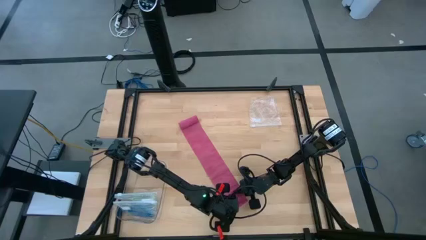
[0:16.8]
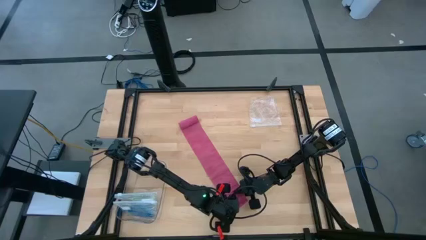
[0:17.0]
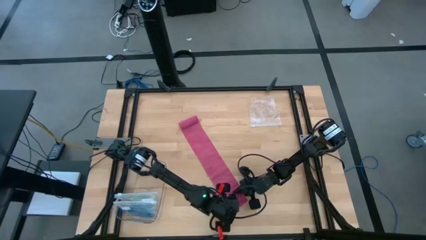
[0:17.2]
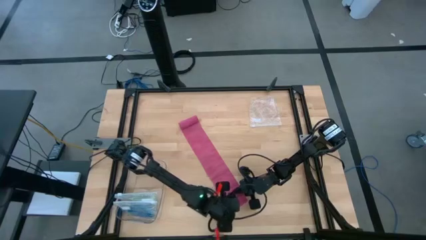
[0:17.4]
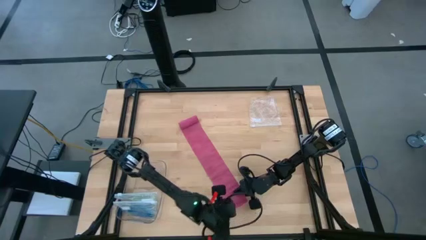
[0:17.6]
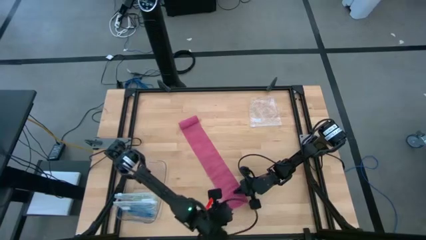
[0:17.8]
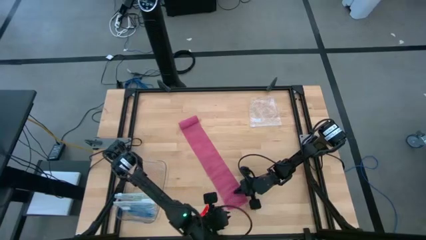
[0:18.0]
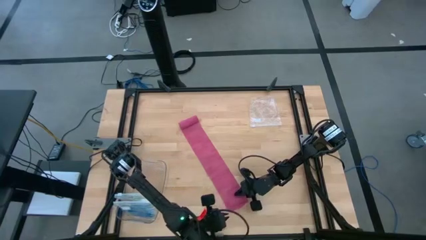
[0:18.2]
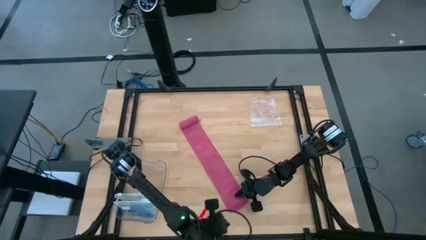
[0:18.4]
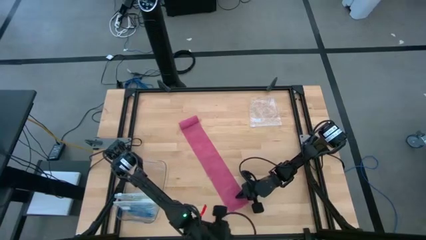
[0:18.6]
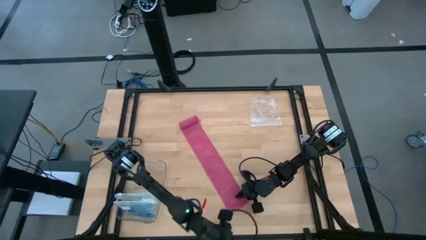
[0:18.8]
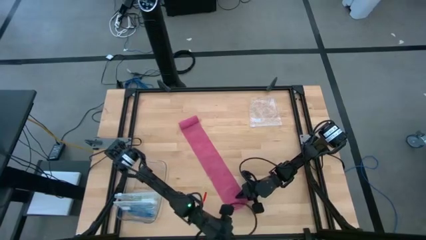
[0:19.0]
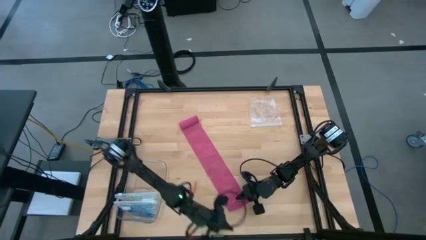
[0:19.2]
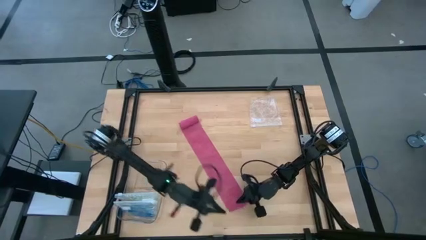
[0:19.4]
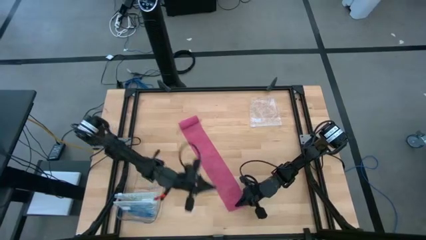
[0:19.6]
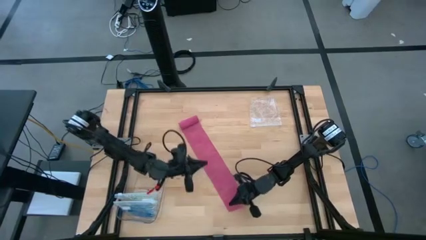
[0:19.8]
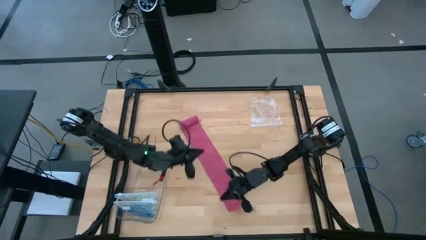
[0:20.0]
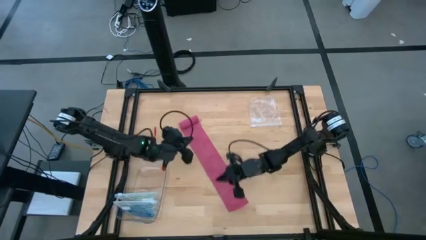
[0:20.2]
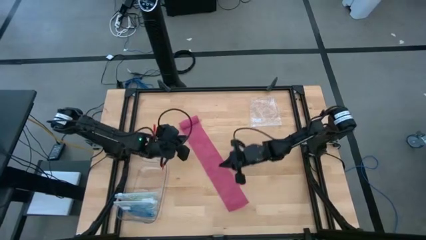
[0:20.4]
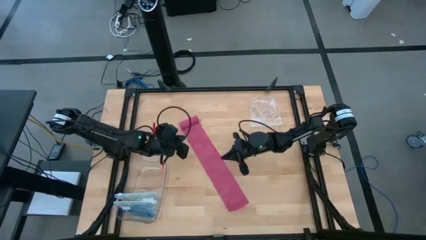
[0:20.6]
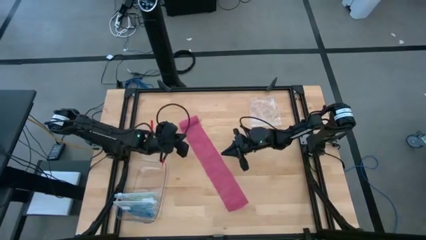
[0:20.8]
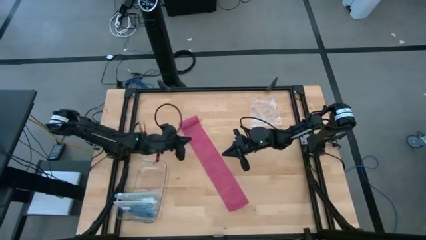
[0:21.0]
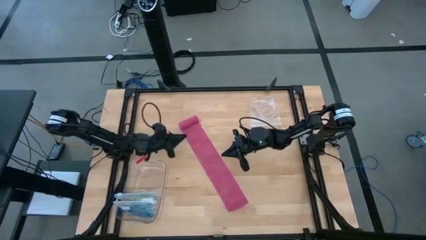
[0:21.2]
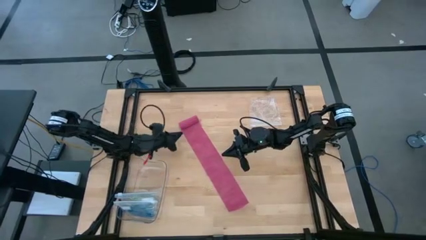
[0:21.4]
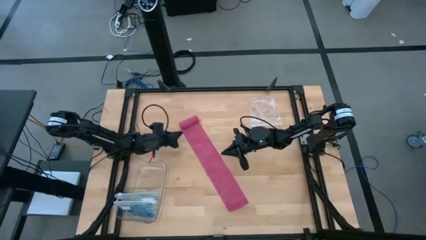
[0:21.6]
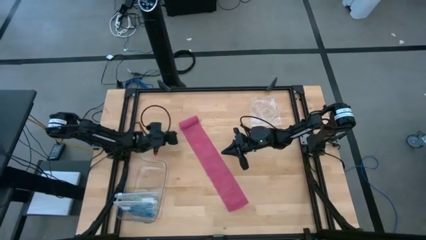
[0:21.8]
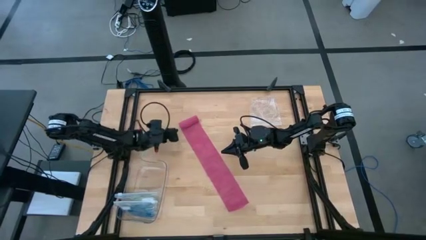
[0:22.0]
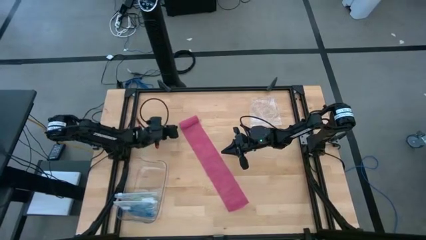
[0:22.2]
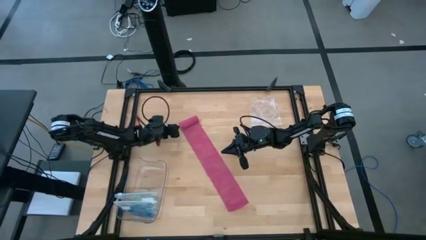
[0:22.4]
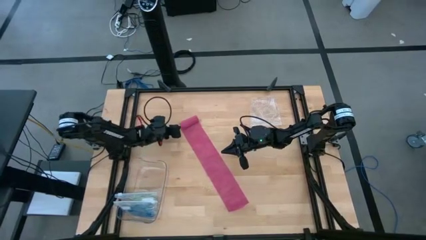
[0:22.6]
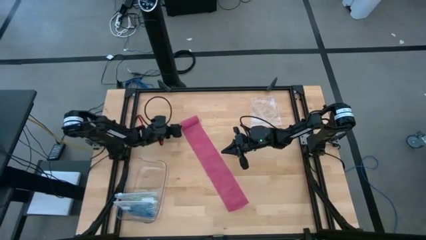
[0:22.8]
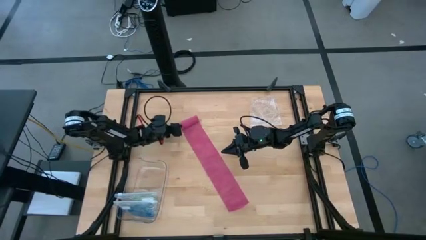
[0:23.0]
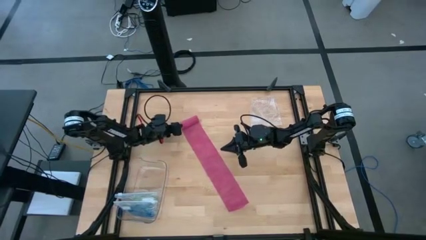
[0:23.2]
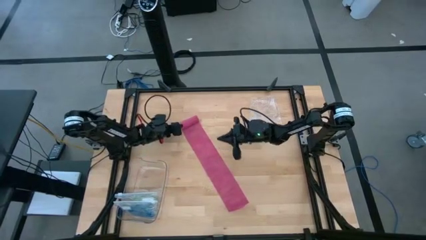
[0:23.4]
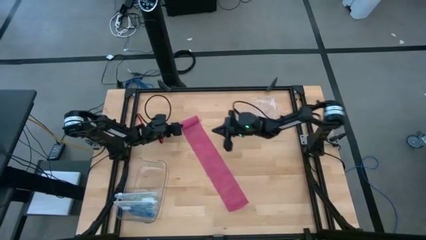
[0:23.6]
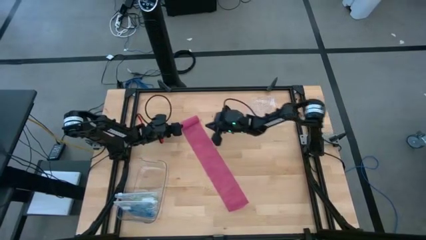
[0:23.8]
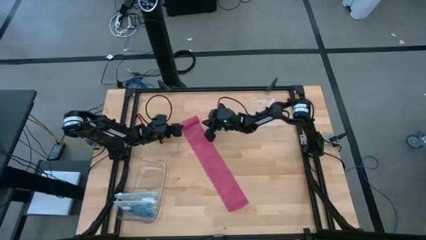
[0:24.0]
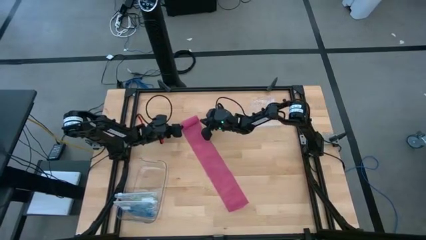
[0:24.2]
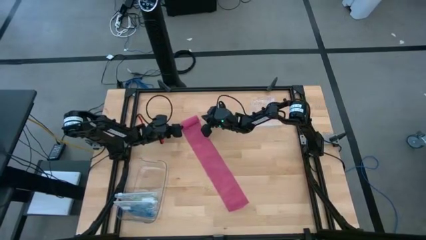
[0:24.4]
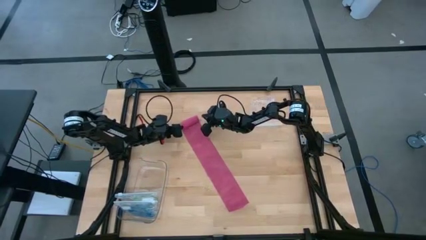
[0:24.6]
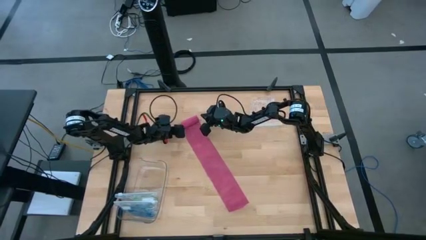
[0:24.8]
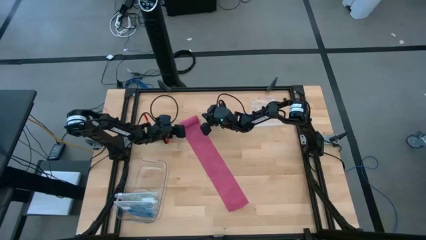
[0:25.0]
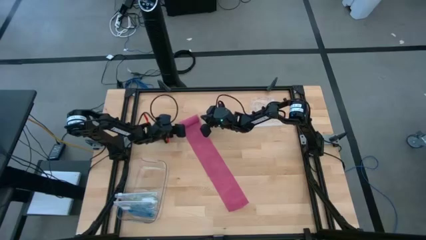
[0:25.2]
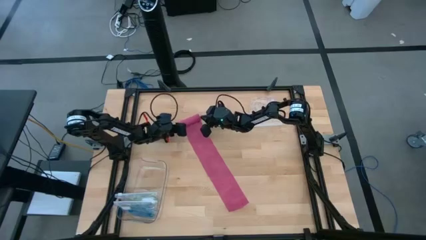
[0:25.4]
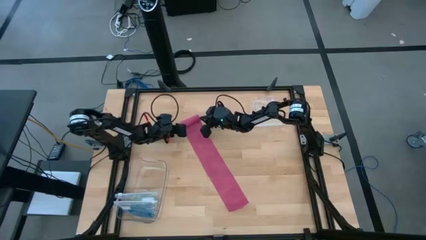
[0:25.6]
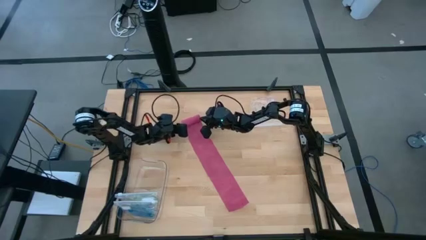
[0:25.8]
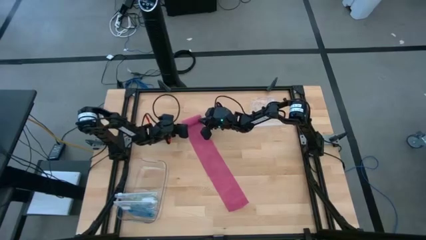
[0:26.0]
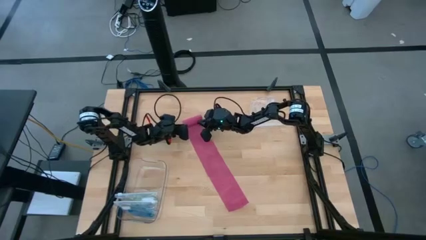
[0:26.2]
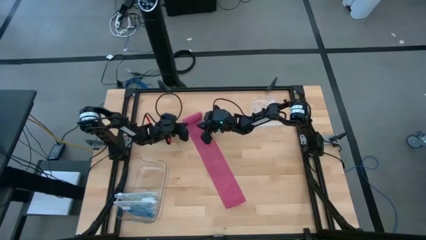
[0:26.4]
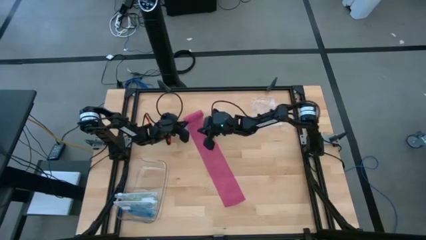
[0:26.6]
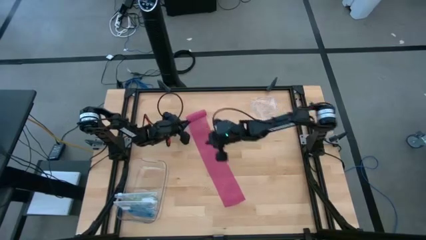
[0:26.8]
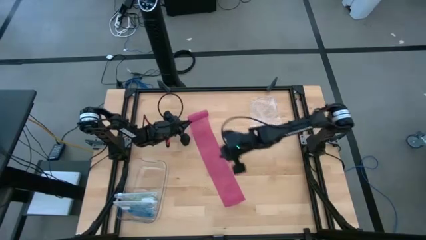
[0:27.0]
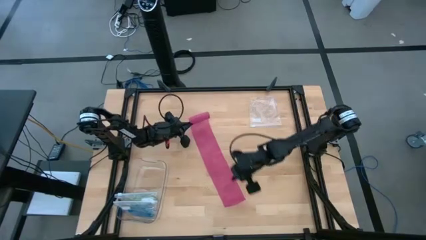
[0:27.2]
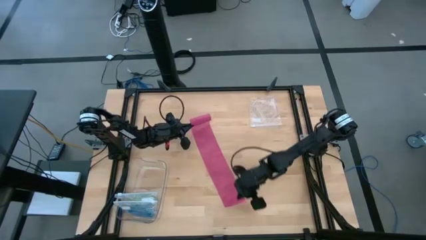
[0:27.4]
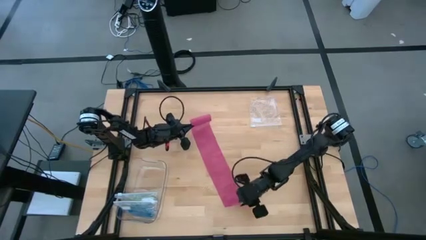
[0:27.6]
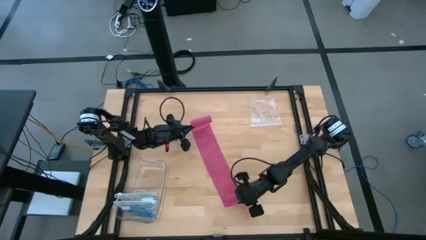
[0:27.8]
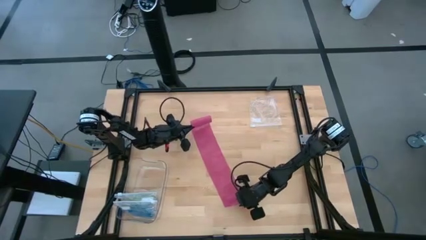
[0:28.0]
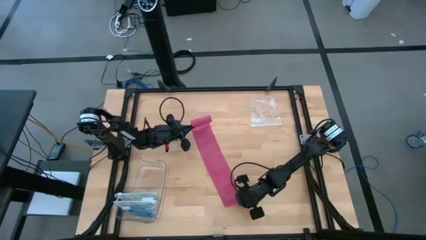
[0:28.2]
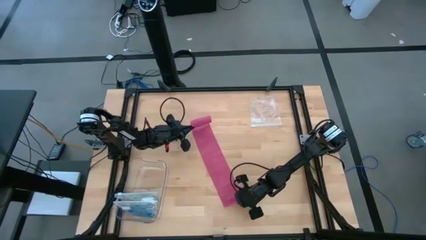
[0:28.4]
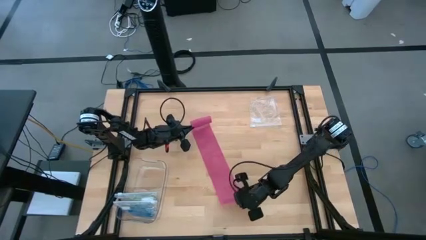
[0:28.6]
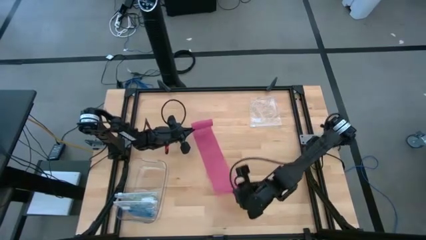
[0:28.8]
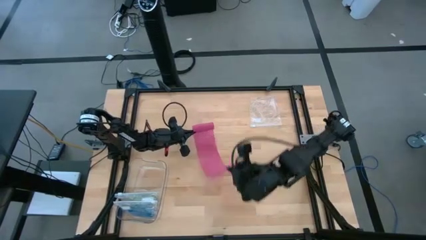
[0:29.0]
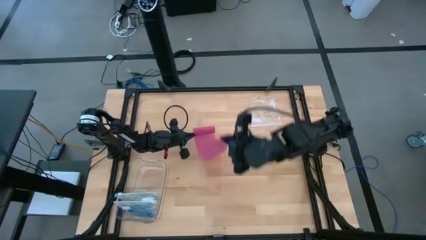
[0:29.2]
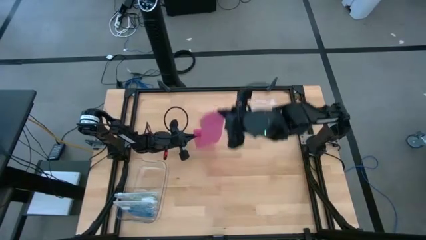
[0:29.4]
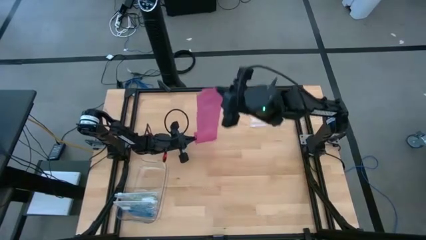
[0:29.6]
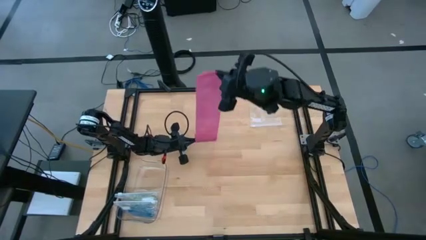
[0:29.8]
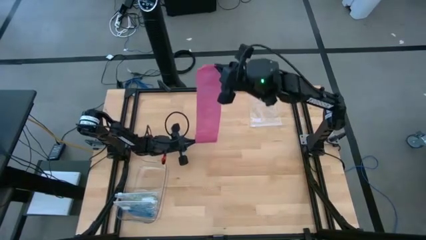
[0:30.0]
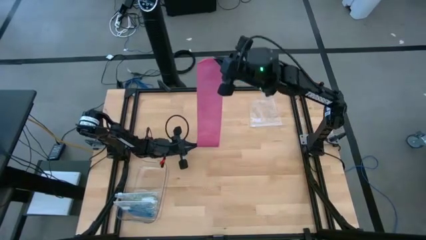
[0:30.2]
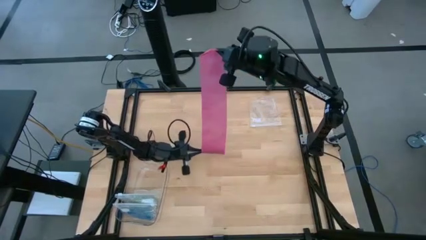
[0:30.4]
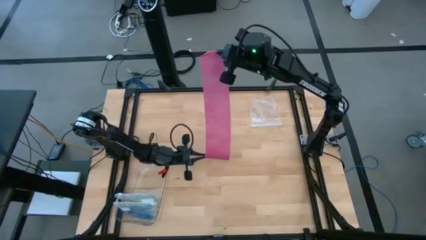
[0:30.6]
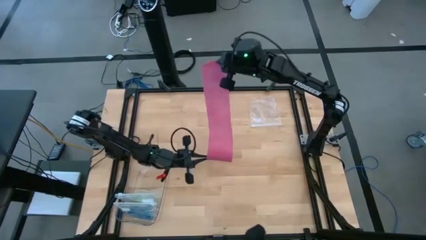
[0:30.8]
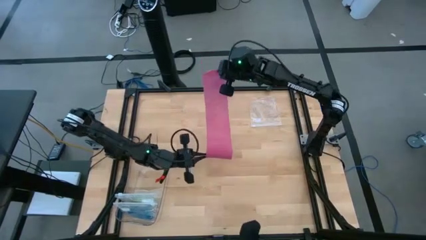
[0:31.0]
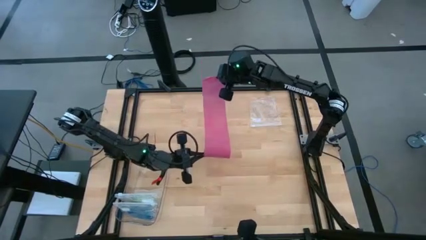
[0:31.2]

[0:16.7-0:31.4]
Task: Roll bandage
Roll the pink bandage
